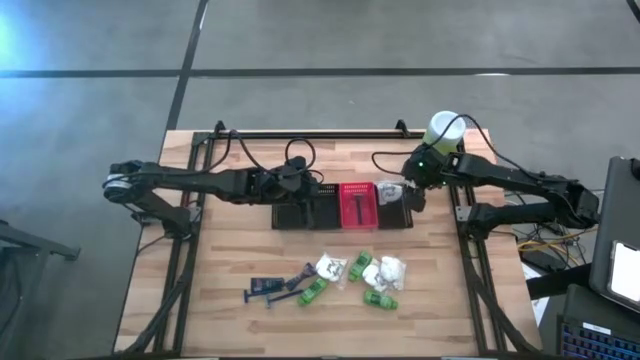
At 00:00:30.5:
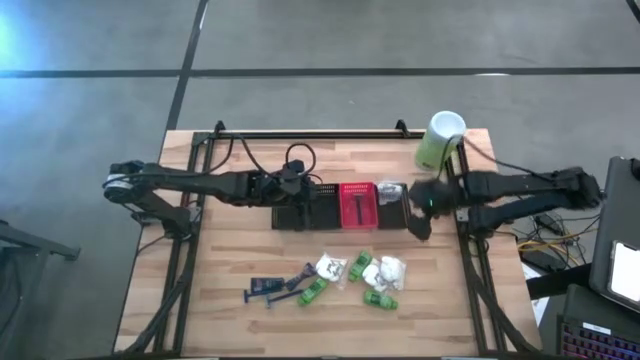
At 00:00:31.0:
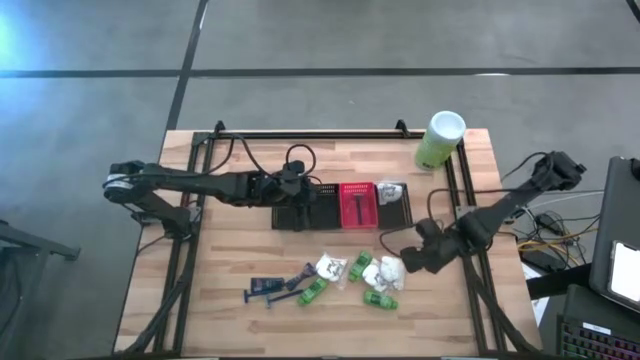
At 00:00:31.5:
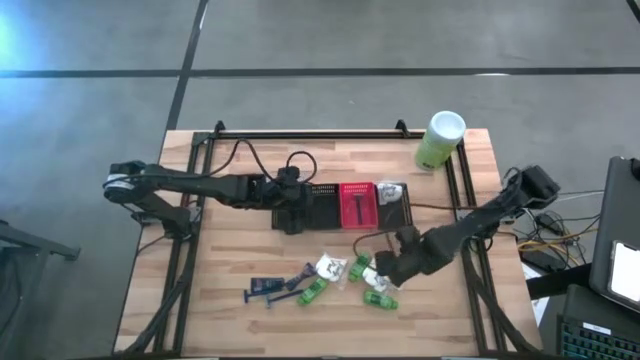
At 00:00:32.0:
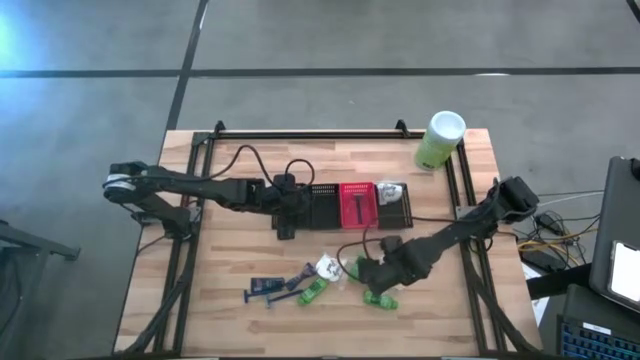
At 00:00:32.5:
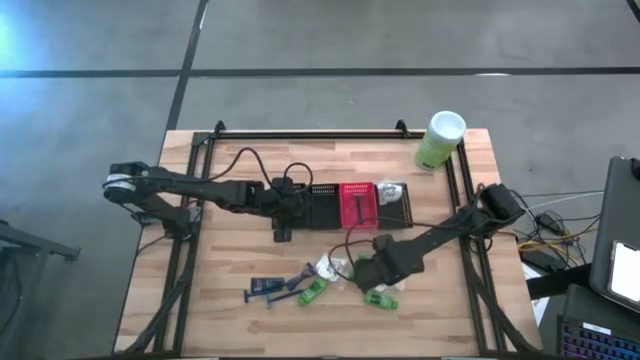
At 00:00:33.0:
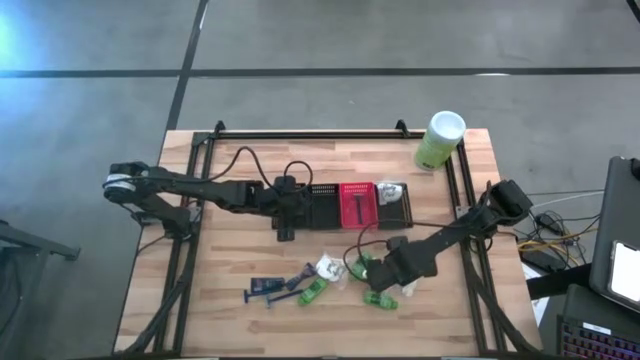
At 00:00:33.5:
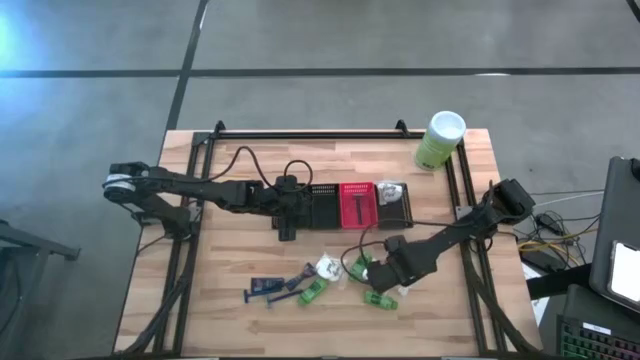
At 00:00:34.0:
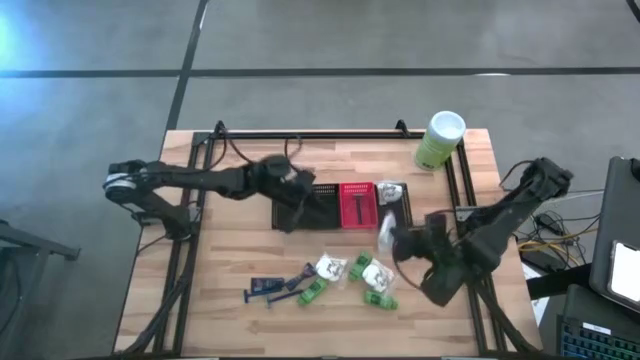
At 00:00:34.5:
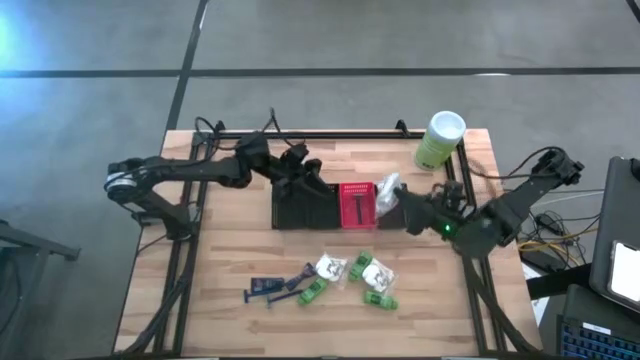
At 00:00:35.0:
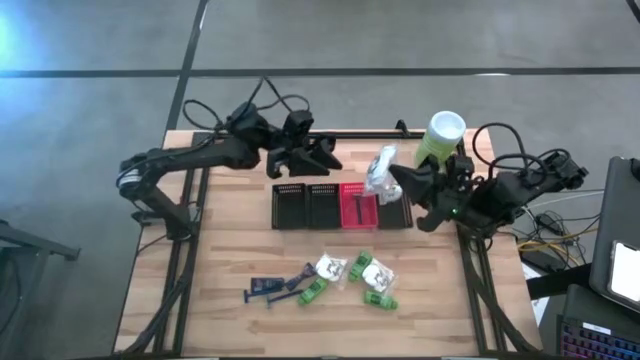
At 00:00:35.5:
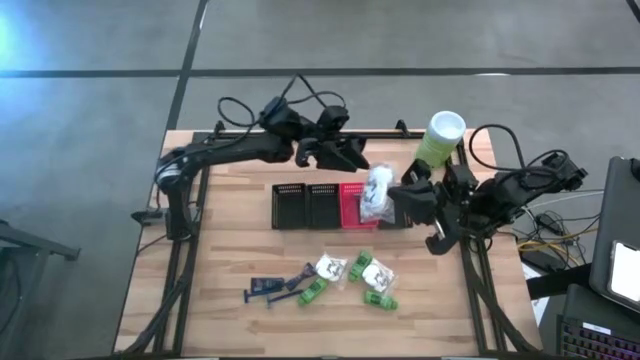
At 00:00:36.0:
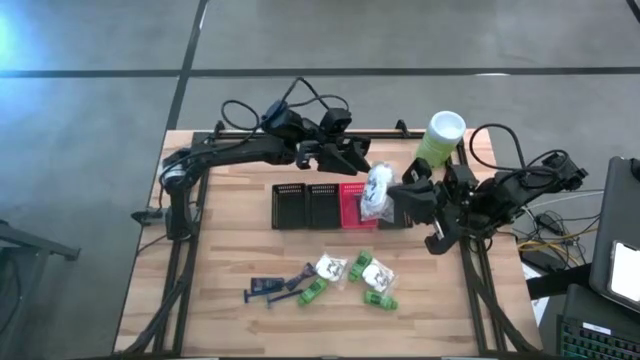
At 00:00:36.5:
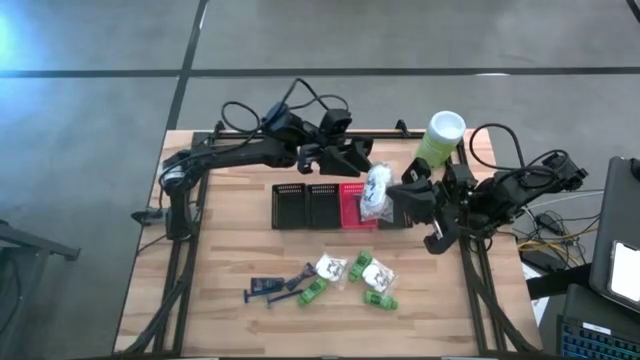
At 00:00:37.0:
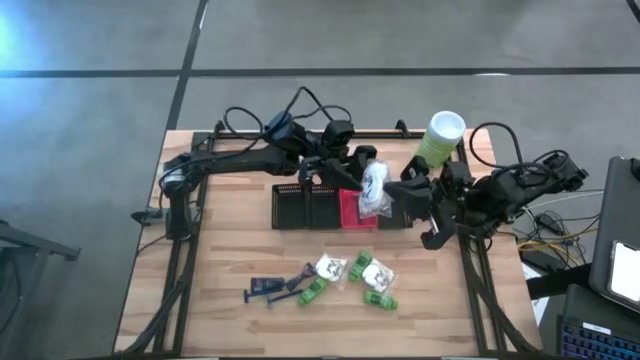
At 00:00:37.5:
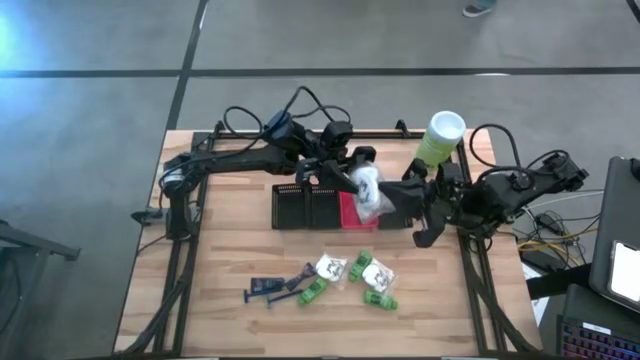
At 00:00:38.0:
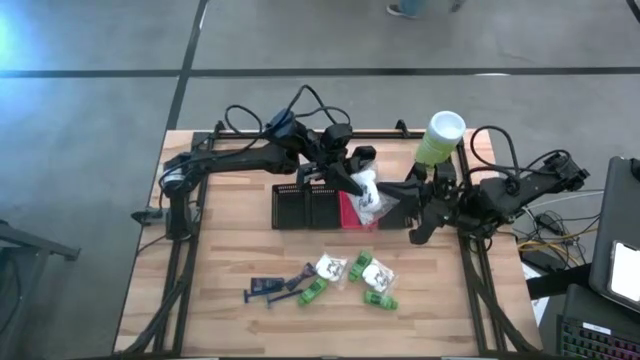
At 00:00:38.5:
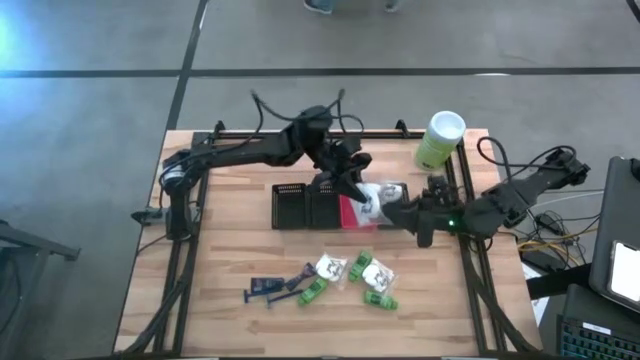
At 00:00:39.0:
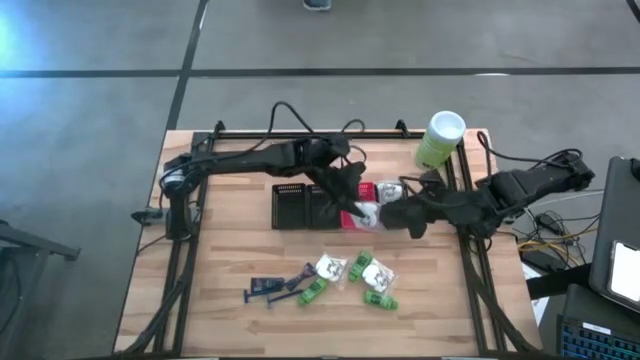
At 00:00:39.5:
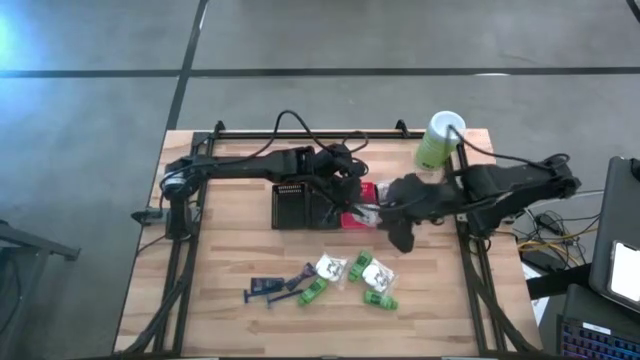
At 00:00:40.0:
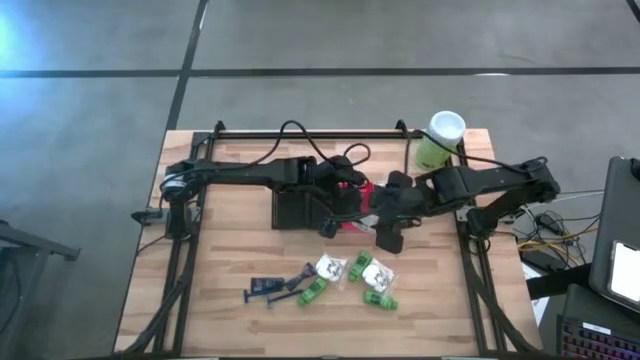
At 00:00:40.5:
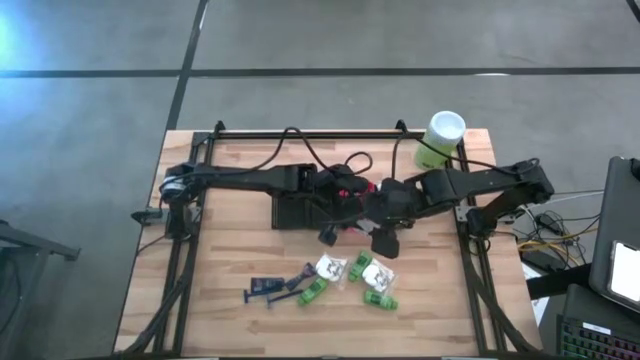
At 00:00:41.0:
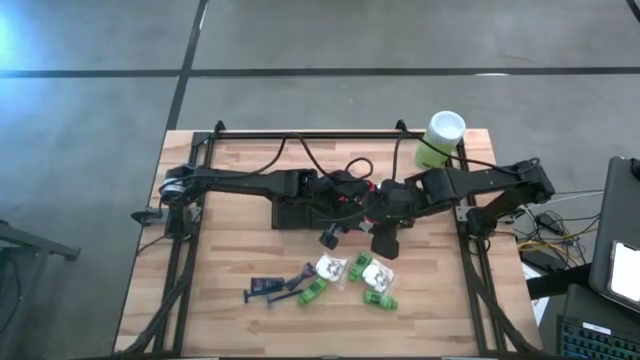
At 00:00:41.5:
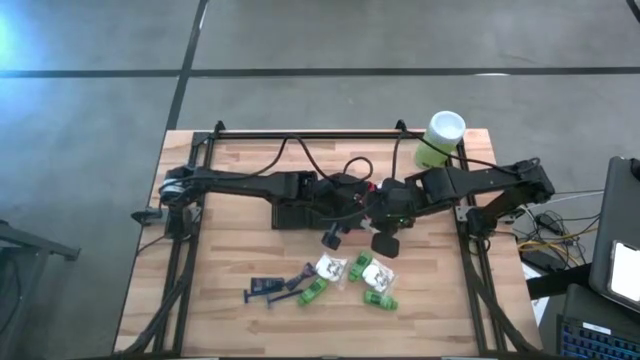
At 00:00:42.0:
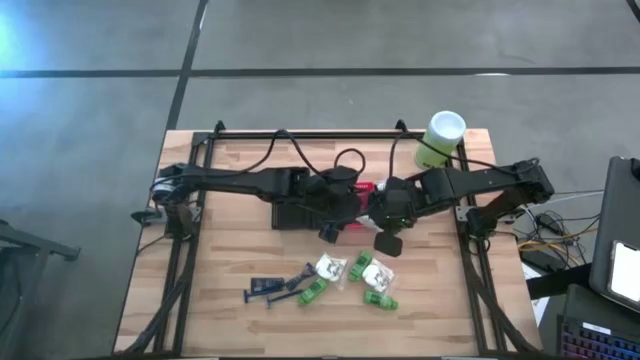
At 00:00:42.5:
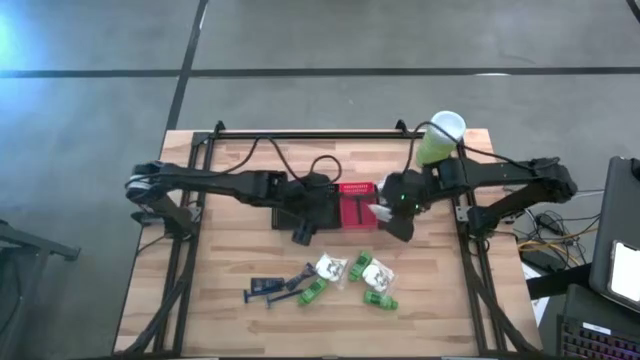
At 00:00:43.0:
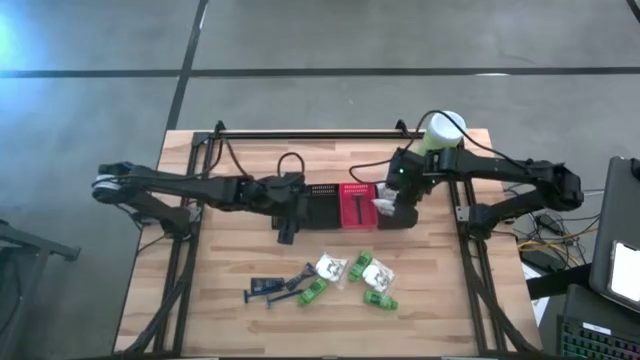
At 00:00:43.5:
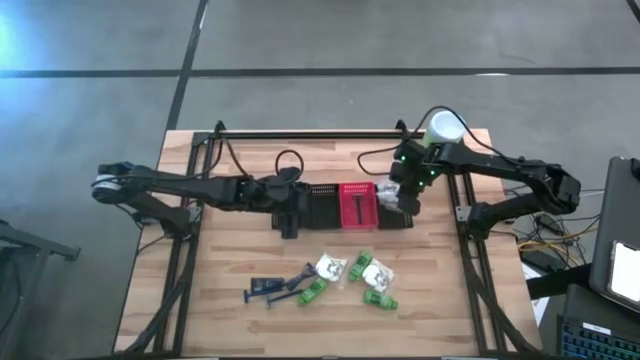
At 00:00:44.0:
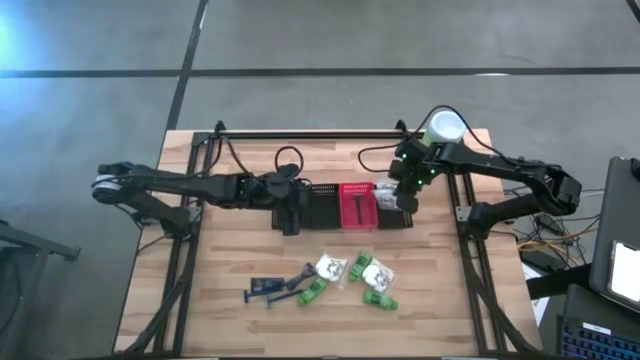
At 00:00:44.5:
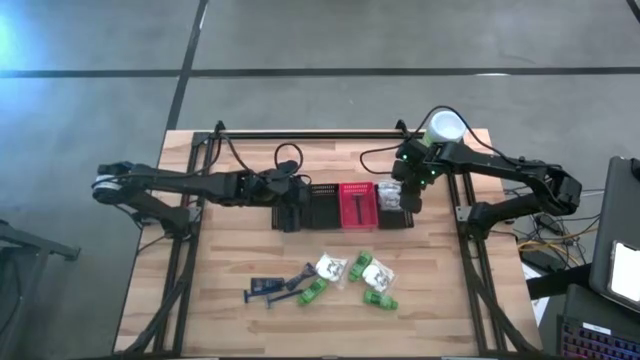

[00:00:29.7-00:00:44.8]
Task: Pick & Place Travel size toiletries
Put the white cotton pack into the right black basket

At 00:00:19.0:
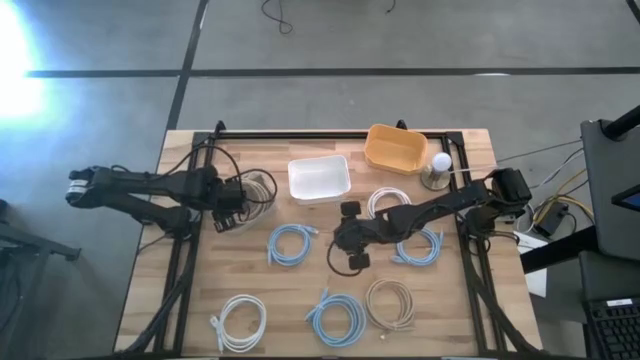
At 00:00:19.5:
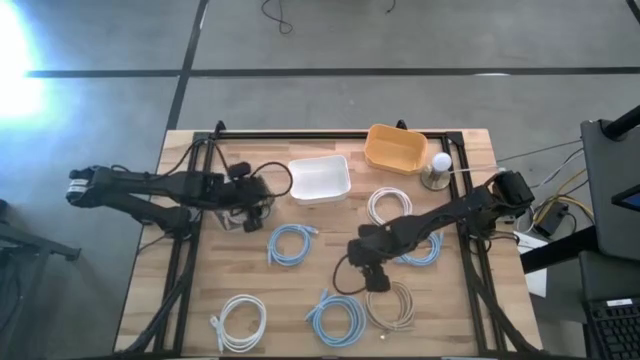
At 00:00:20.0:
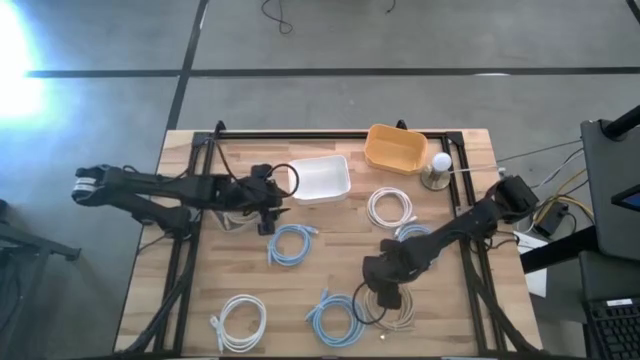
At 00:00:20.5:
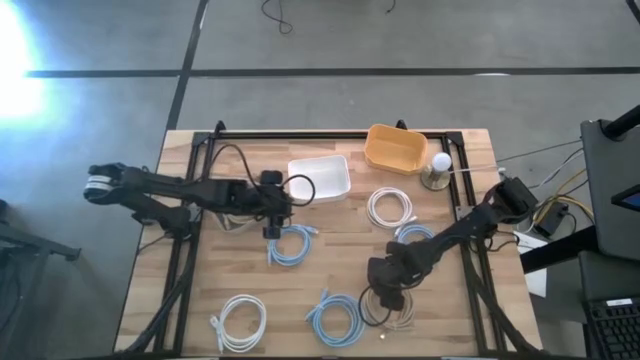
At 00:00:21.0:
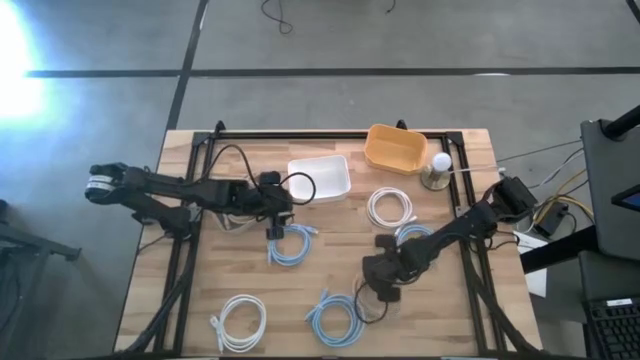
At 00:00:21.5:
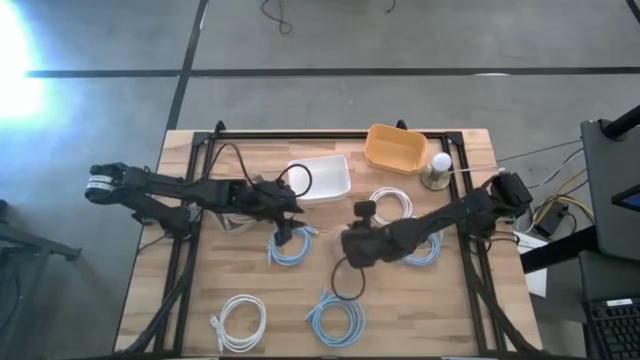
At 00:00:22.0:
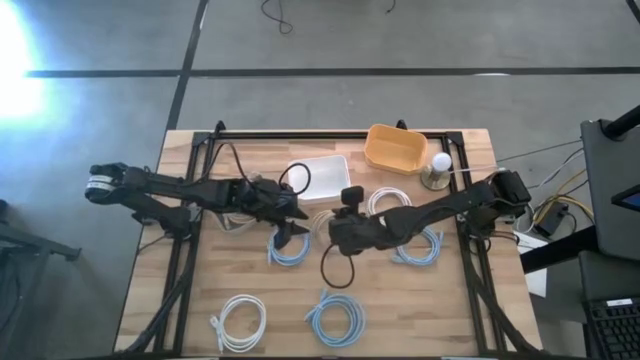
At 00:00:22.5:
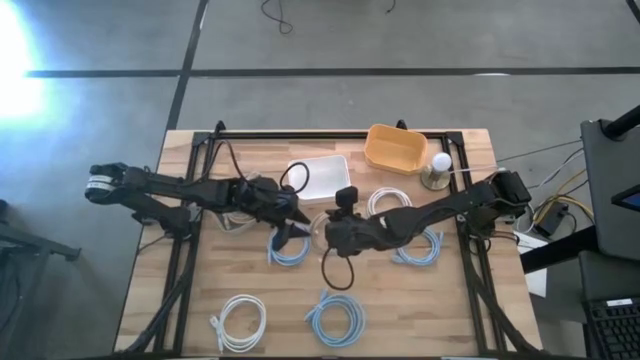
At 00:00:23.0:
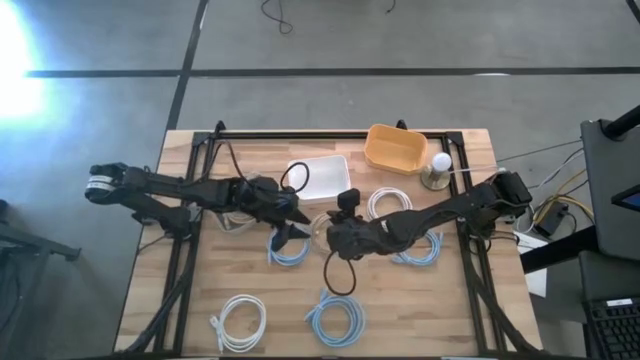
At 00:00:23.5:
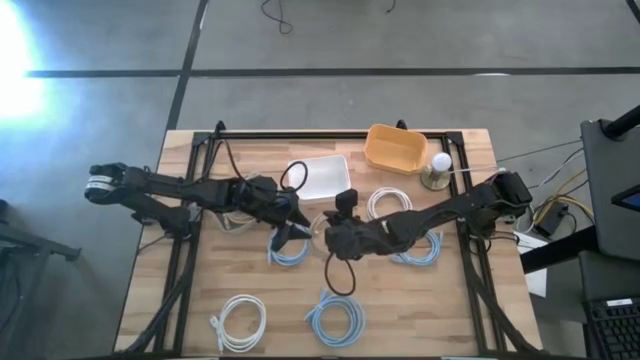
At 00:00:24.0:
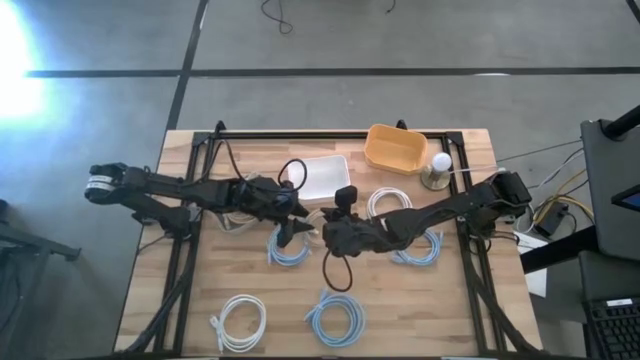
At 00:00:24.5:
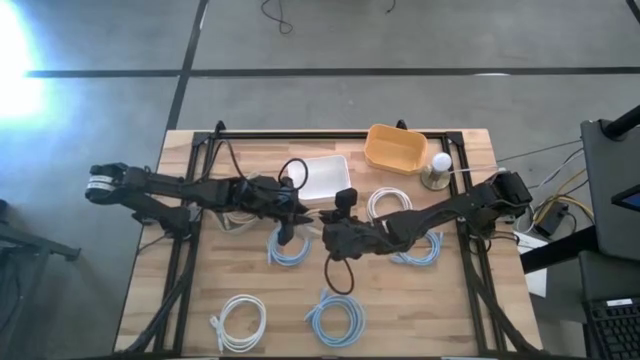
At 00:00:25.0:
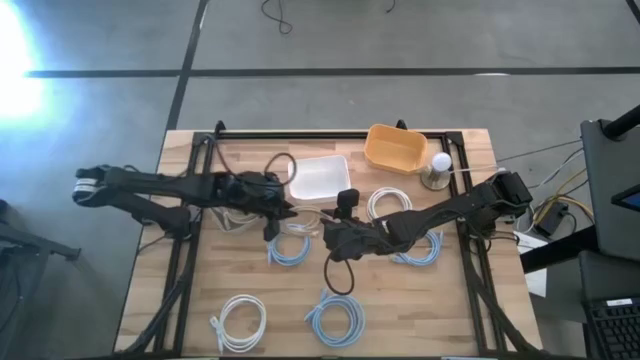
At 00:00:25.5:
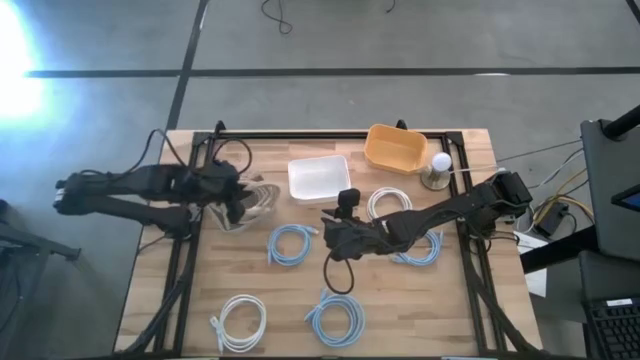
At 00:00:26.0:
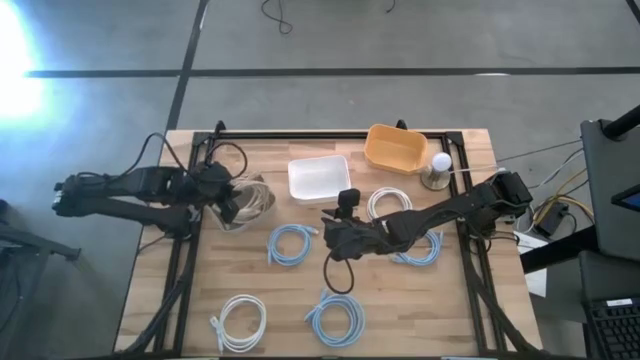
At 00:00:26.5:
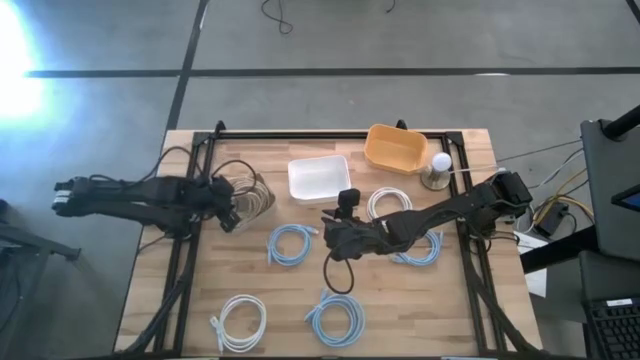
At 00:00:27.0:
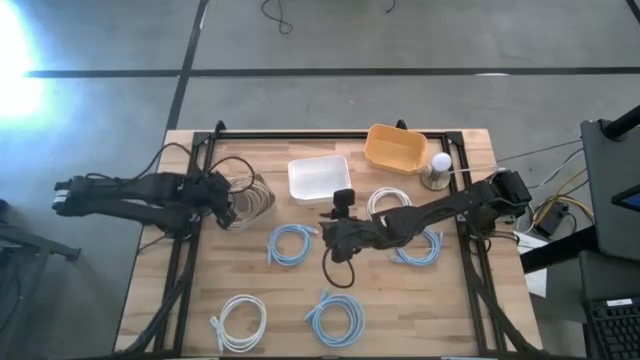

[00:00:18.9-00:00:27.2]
Task: Sort HDMI cables
Put the brown HDMI cable into the gray bin
